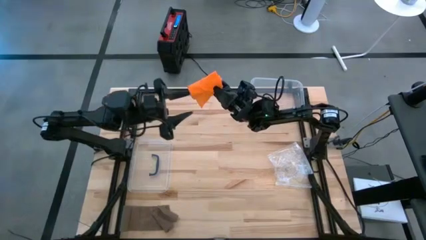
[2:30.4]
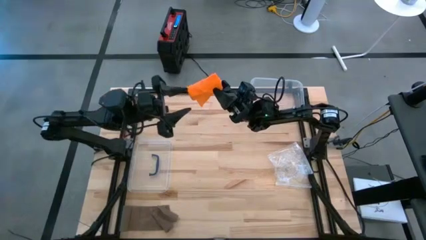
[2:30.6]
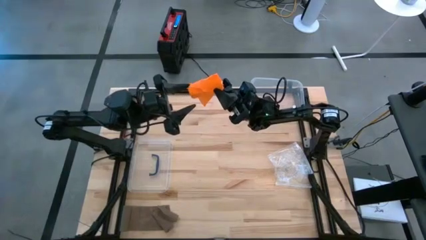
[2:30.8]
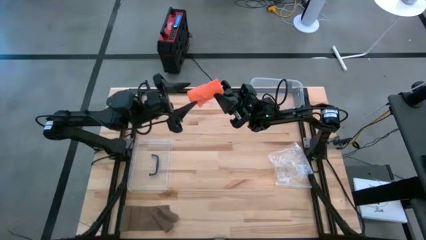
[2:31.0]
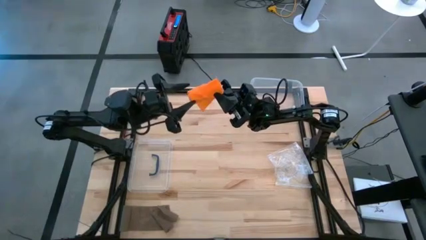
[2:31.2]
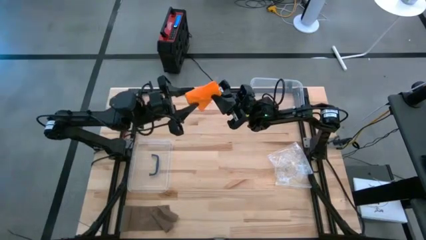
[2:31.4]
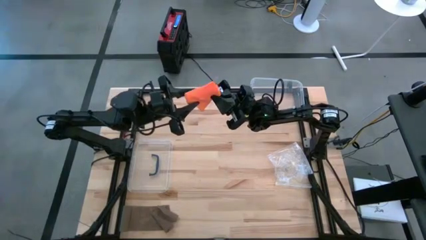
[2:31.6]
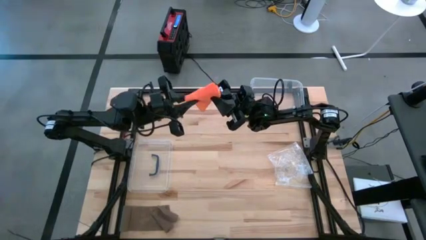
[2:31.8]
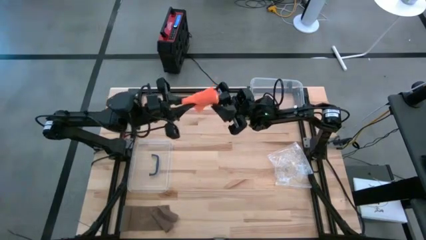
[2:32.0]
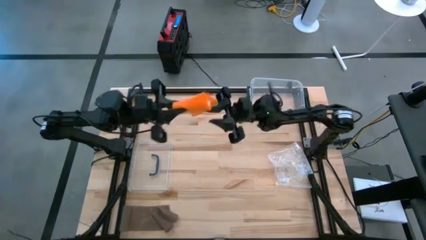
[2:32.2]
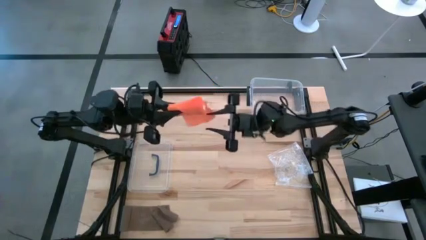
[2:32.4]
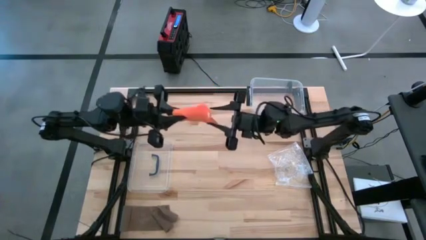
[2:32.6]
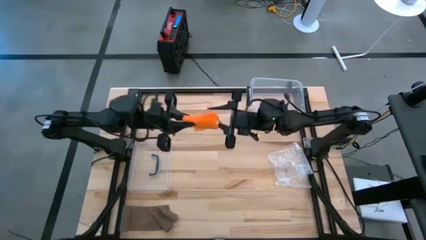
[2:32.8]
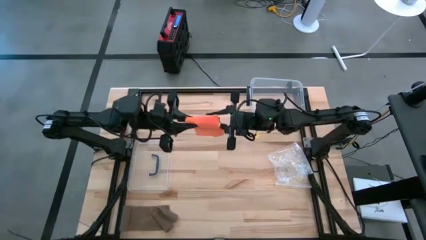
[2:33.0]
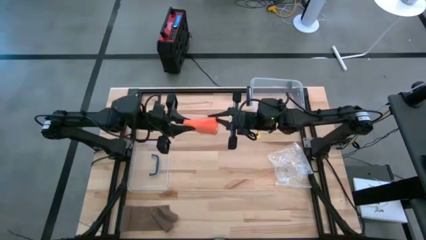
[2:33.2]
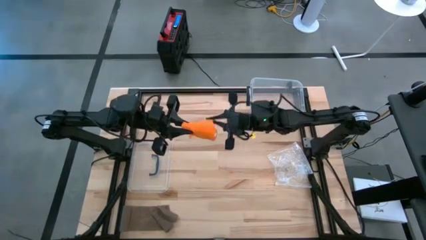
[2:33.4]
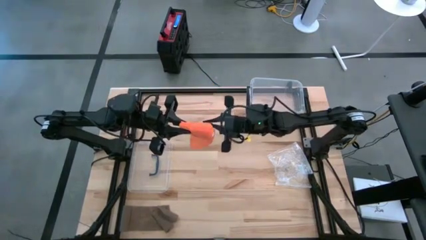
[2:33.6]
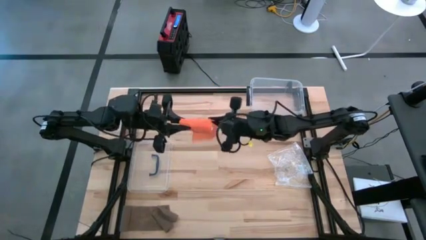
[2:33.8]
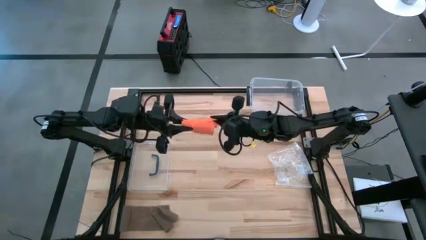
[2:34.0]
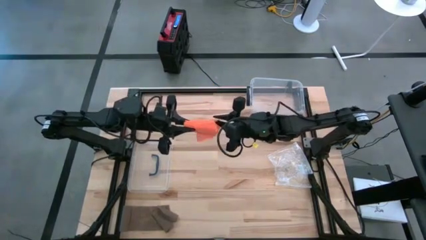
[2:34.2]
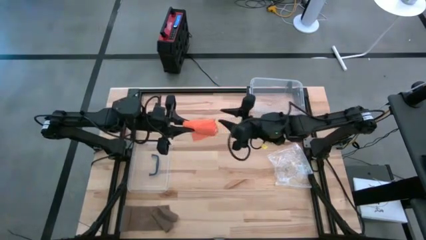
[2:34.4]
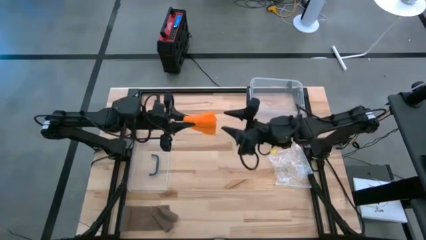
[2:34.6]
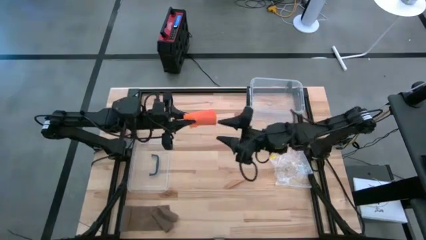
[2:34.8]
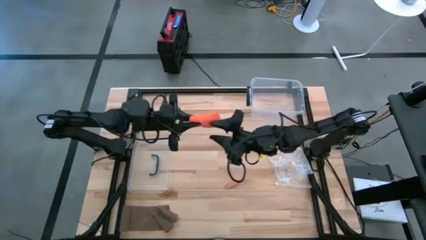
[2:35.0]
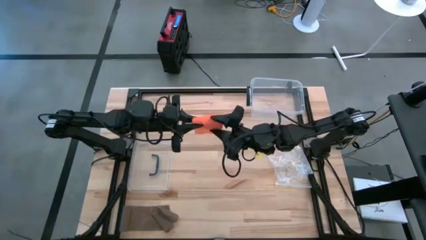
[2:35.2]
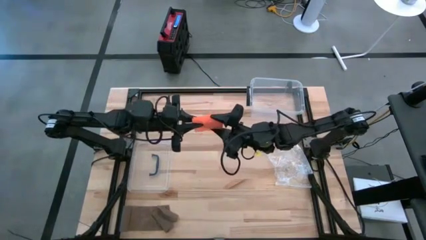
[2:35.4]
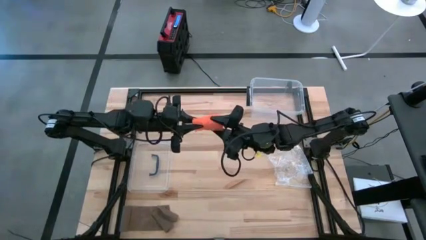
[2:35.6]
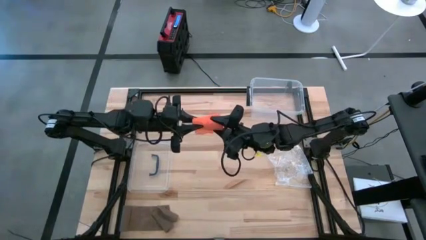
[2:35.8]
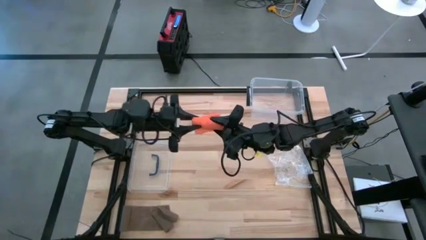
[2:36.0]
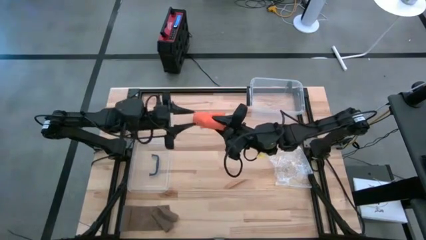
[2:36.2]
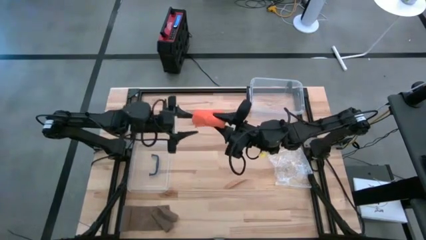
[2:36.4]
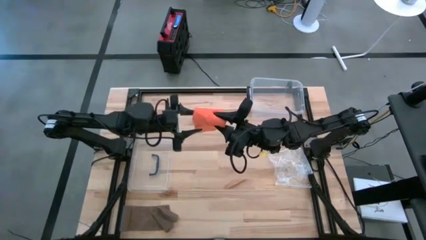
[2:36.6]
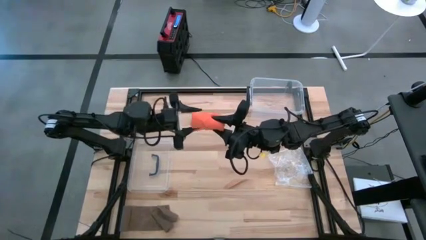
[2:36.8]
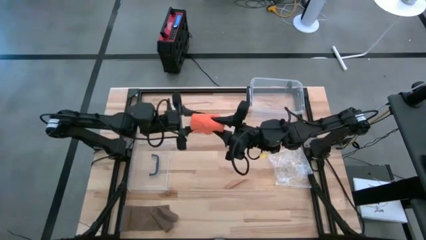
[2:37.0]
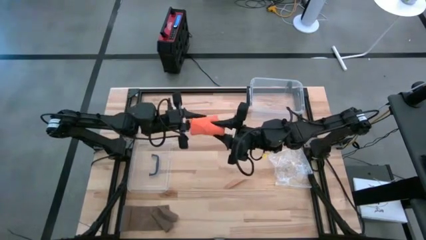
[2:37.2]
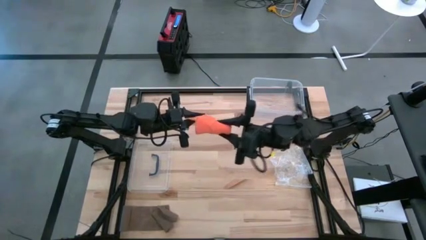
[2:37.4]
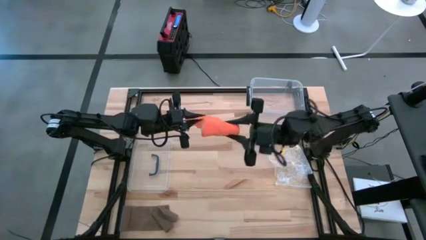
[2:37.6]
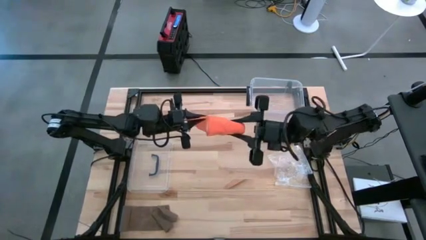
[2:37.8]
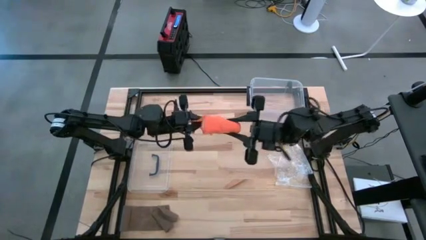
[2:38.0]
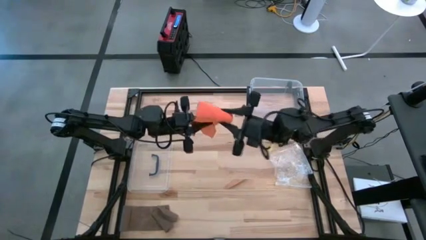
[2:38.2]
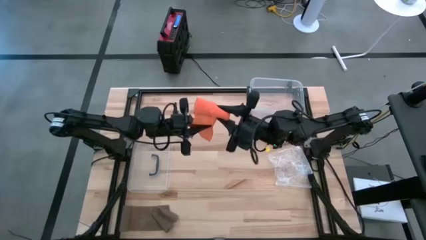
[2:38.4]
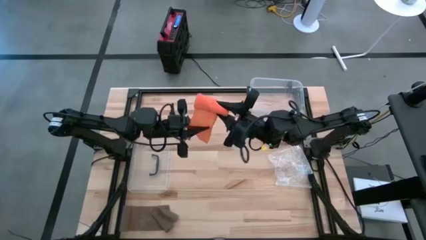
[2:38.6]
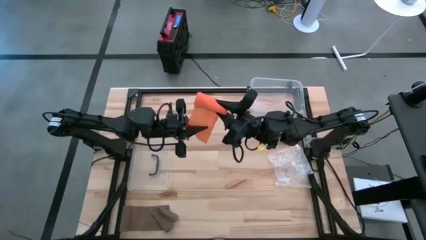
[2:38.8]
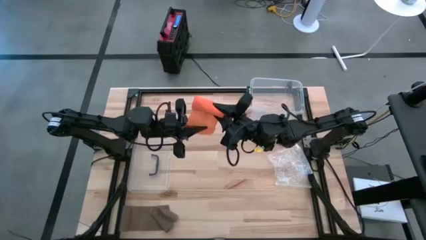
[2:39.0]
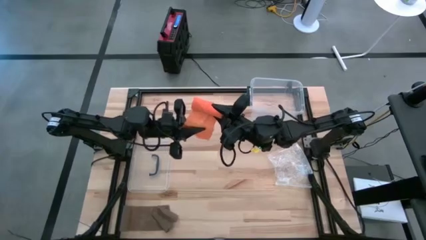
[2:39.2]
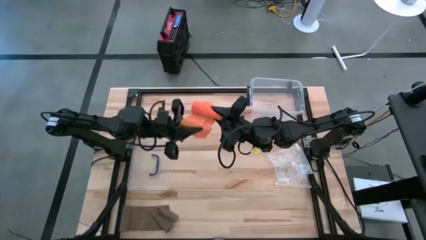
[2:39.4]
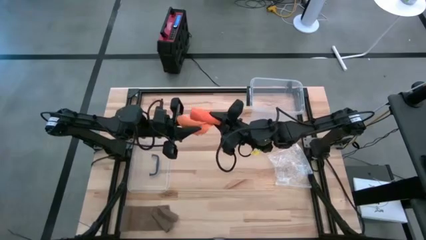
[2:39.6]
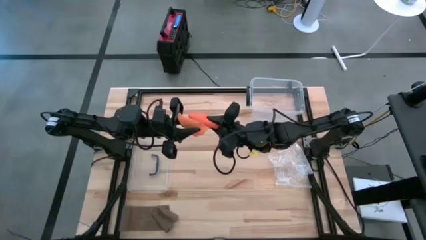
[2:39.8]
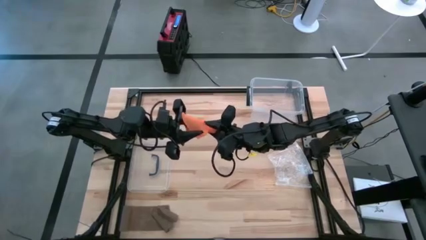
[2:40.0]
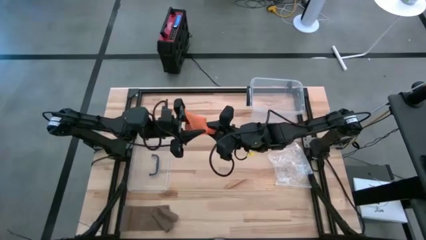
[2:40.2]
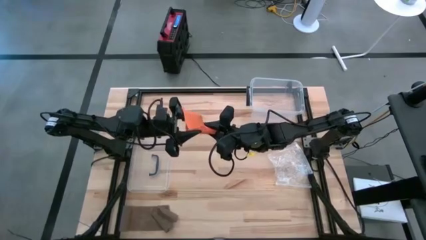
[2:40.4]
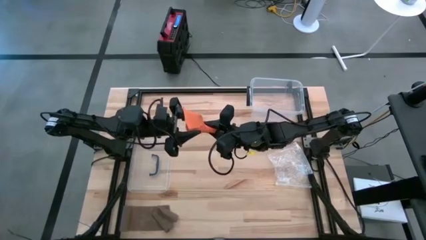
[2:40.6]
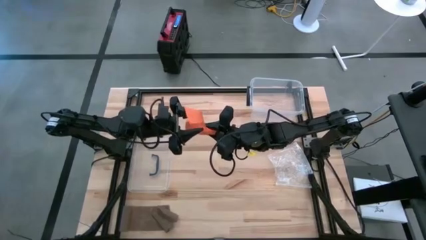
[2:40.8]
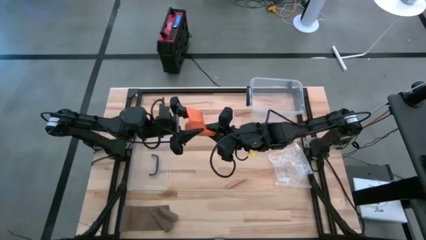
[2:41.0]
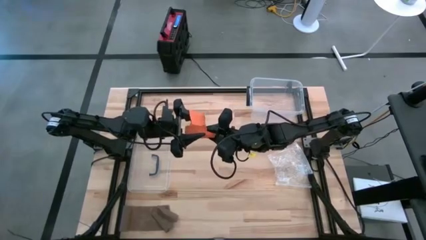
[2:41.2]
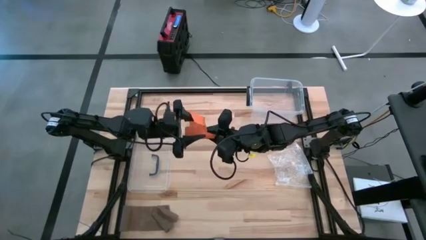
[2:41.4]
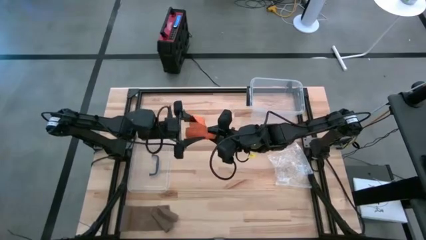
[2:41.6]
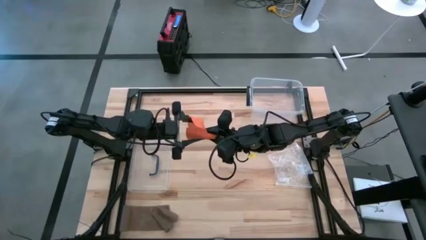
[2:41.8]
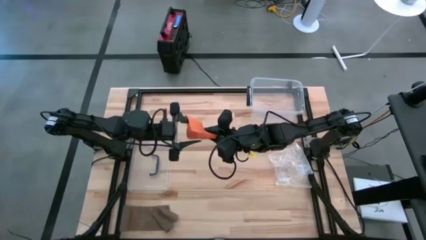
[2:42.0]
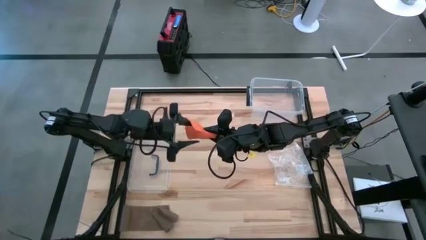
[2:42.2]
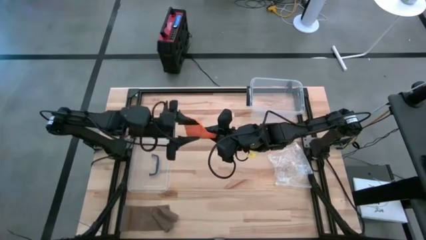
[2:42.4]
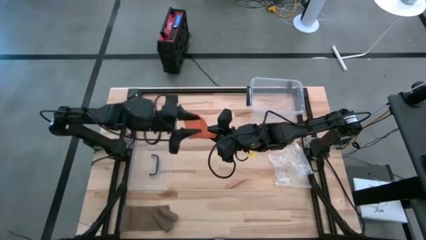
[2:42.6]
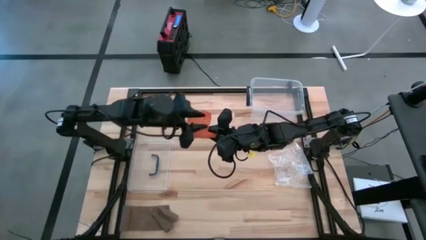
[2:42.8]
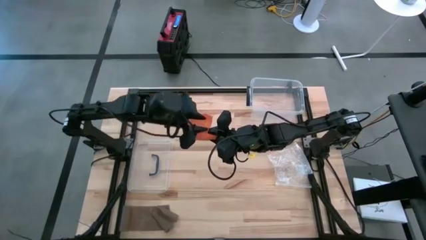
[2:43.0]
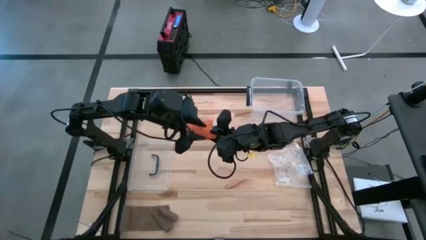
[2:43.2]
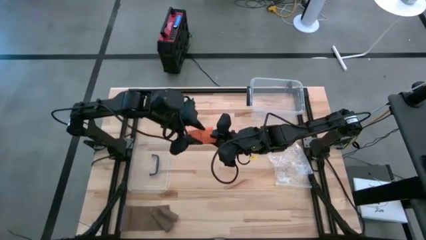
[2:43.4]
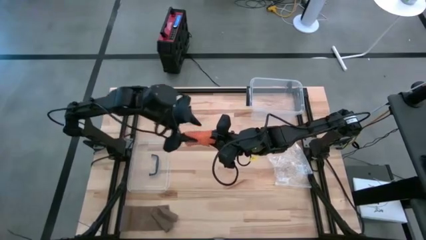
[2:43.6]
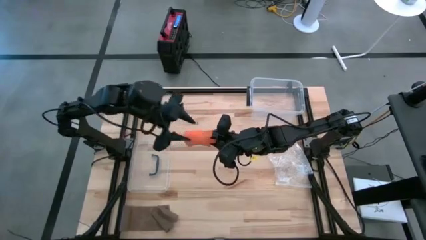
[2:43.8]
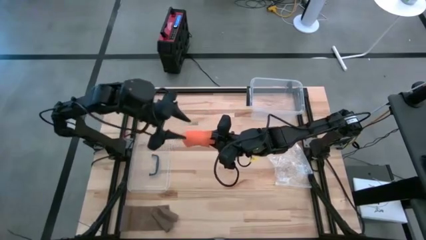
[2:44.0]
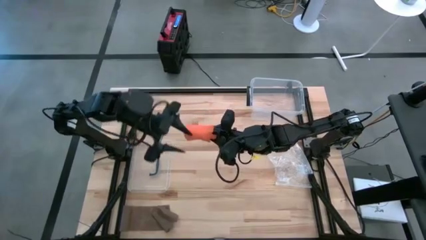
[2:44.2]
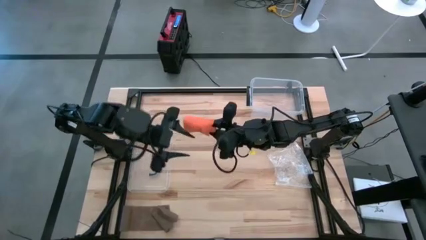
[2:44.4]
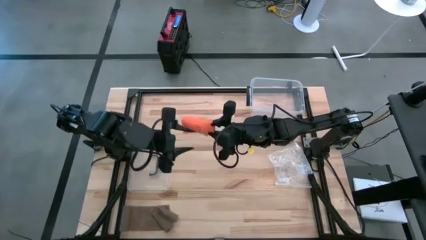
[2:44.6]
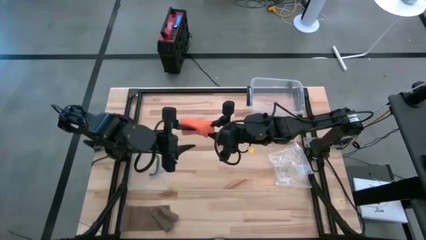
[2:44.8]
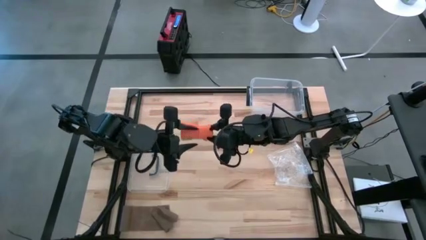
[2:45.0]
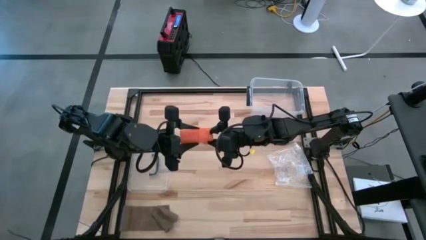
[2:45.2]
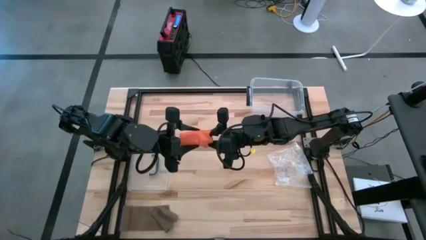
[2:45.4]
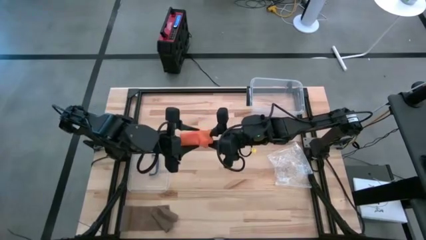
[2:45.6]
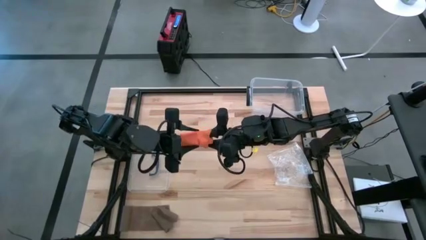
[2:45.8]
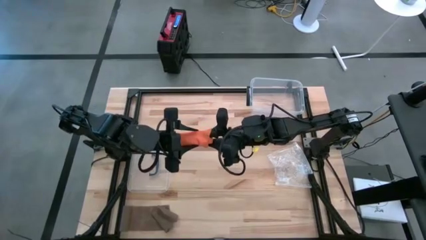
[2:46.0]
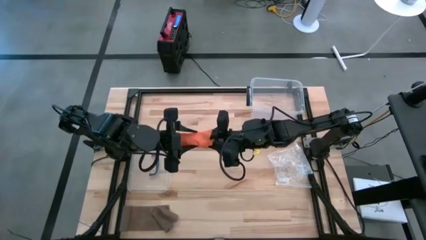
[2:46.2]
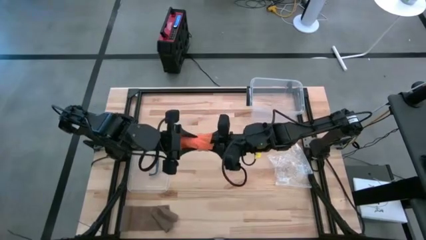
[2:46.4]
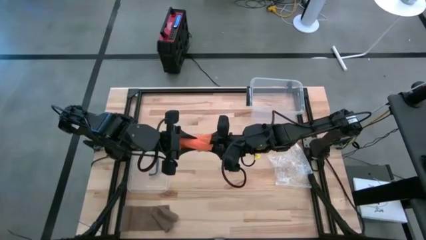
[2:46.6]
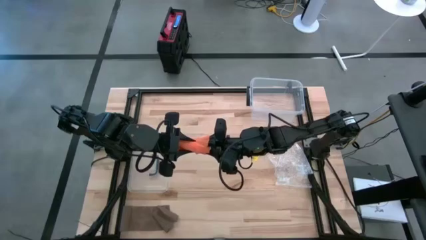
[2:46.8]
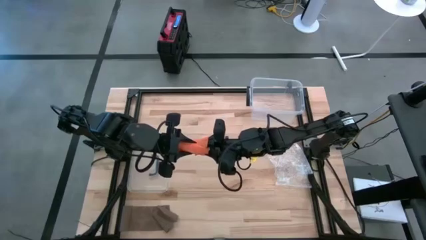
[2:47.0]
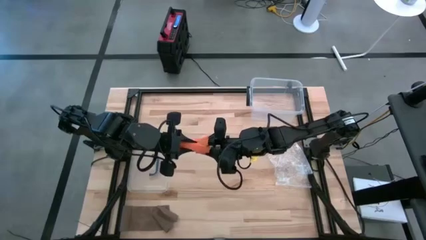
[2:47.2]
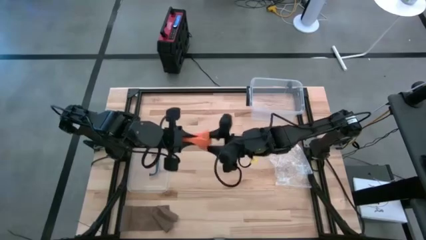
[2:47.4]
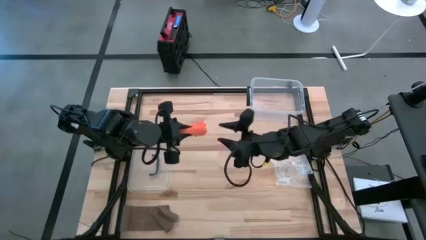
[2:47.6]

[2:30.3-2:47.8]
Task: Roll bandage
Roll the orange bandage
